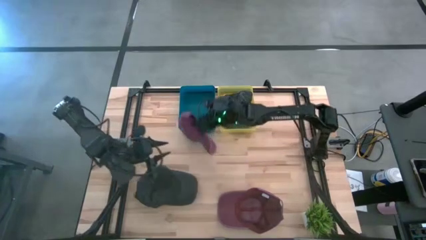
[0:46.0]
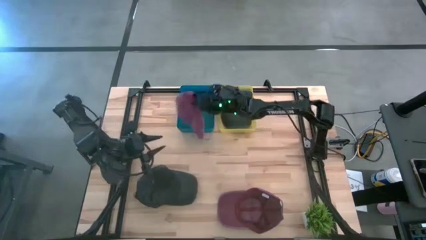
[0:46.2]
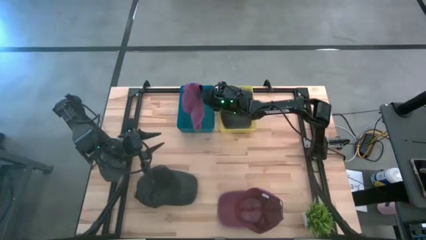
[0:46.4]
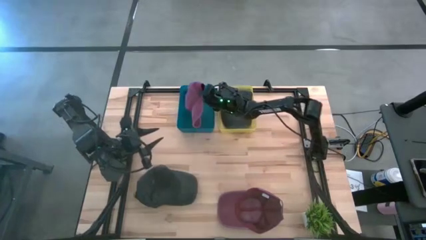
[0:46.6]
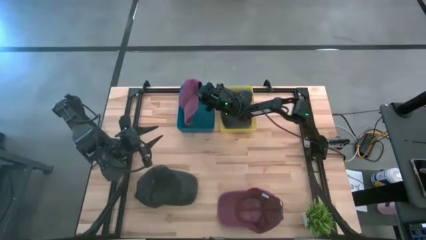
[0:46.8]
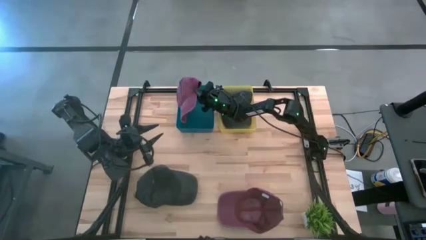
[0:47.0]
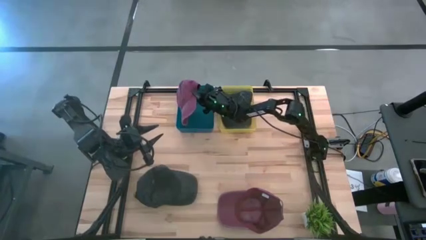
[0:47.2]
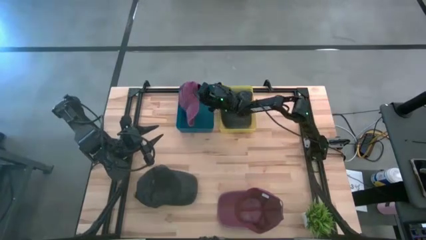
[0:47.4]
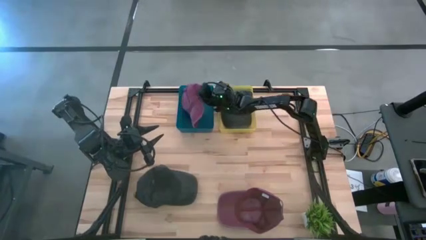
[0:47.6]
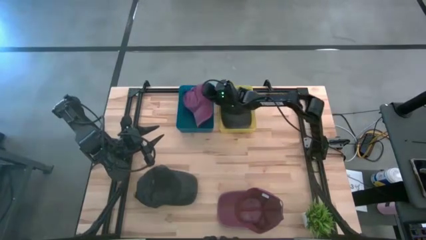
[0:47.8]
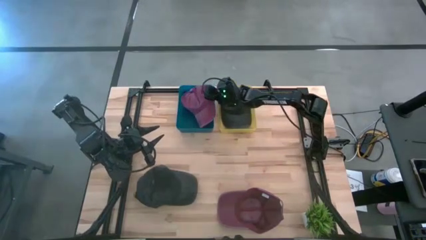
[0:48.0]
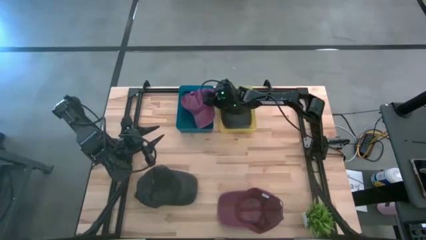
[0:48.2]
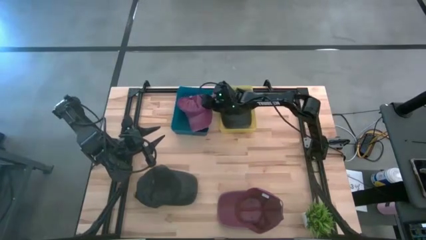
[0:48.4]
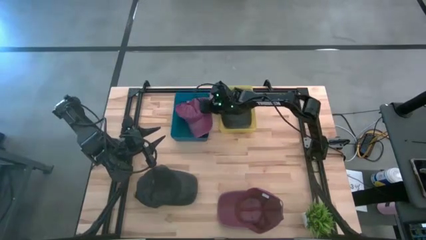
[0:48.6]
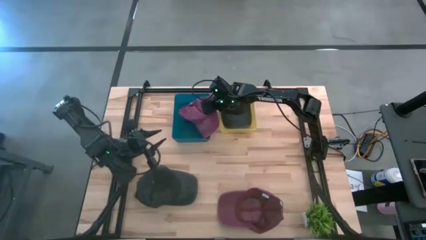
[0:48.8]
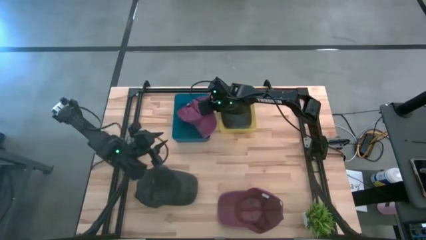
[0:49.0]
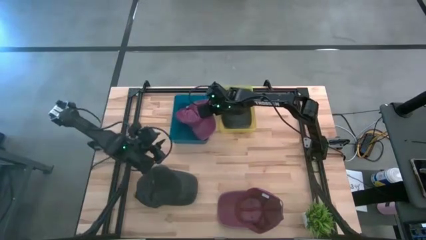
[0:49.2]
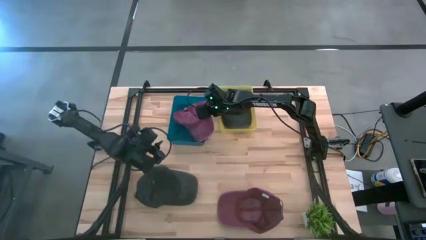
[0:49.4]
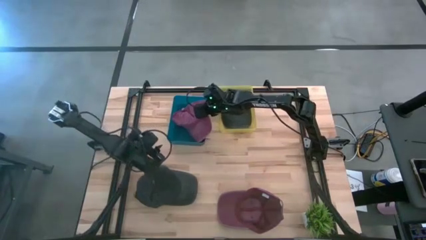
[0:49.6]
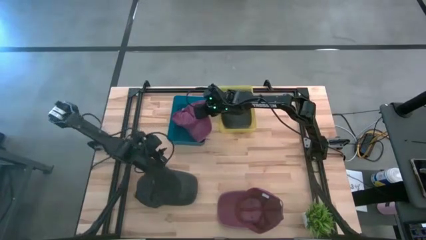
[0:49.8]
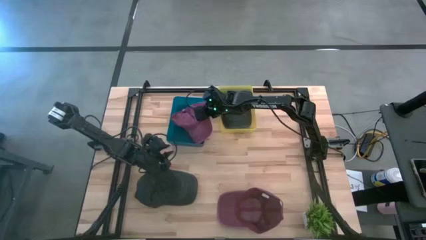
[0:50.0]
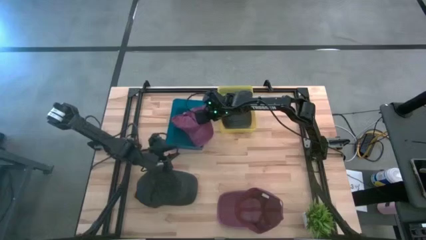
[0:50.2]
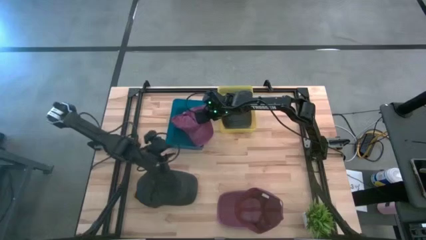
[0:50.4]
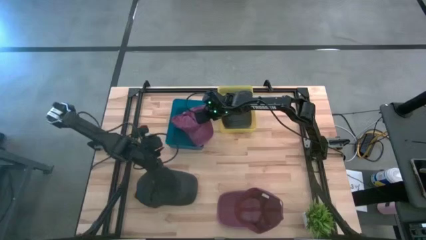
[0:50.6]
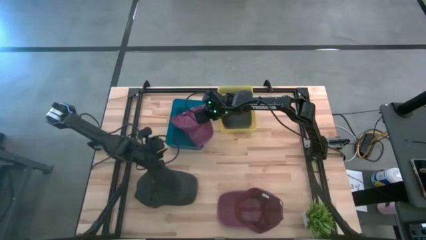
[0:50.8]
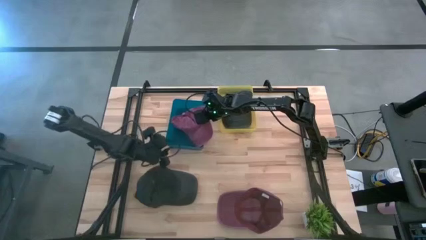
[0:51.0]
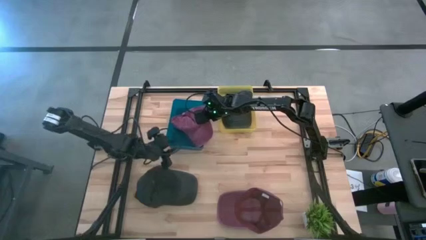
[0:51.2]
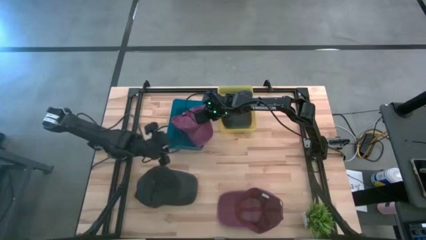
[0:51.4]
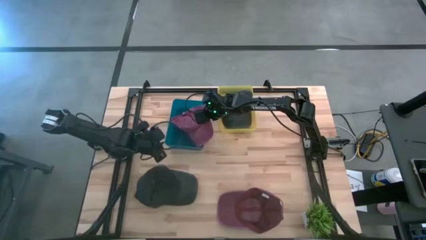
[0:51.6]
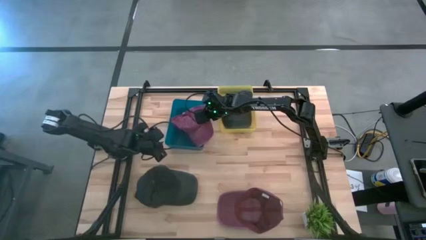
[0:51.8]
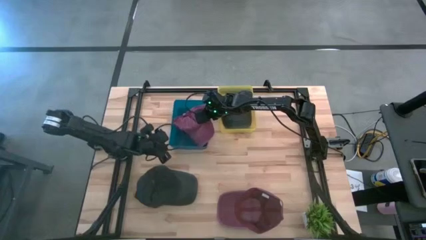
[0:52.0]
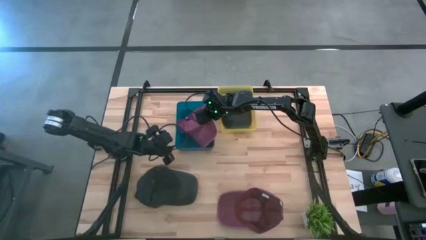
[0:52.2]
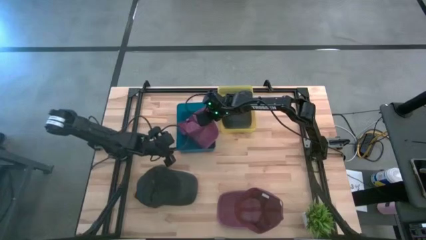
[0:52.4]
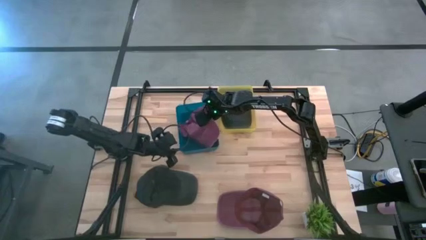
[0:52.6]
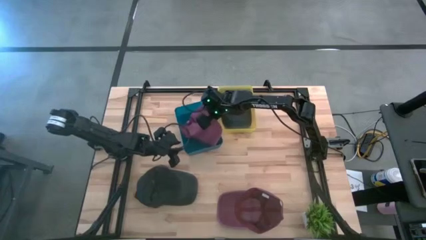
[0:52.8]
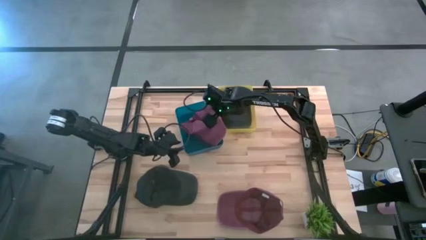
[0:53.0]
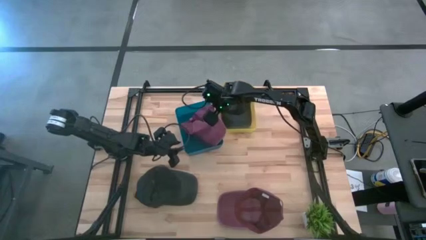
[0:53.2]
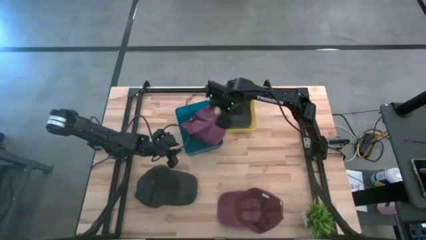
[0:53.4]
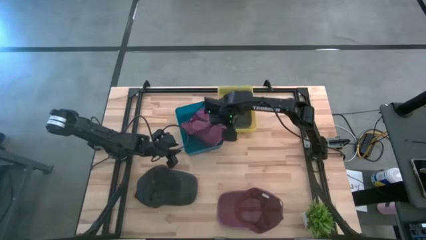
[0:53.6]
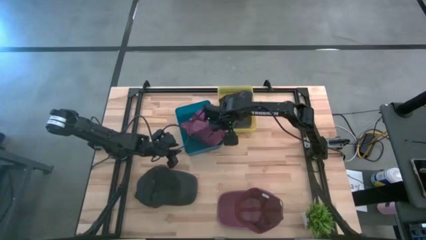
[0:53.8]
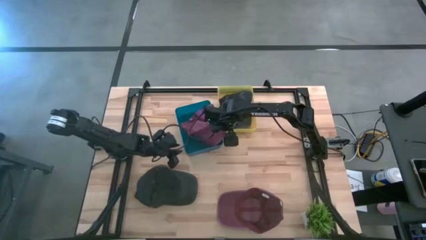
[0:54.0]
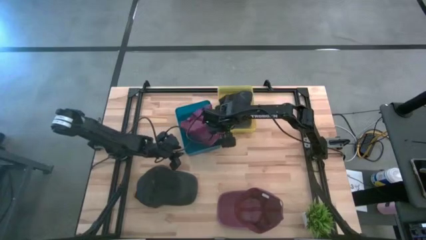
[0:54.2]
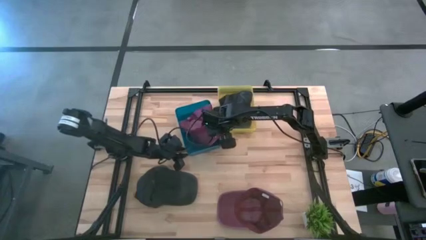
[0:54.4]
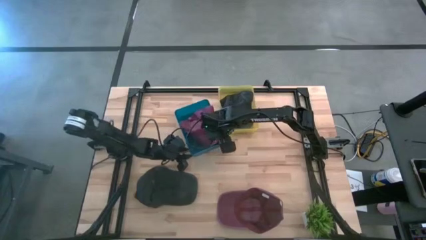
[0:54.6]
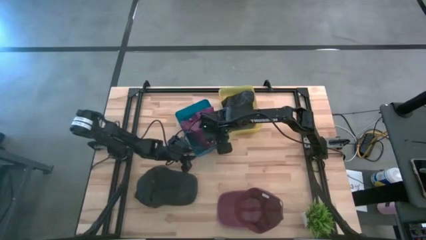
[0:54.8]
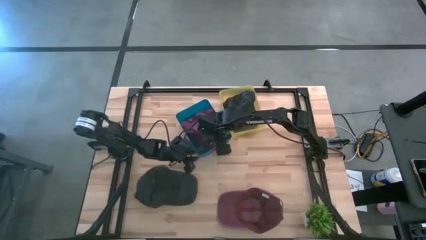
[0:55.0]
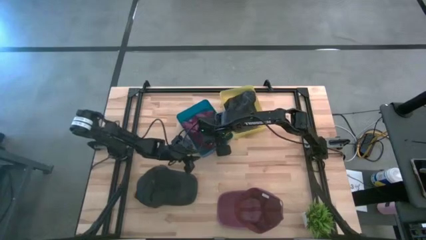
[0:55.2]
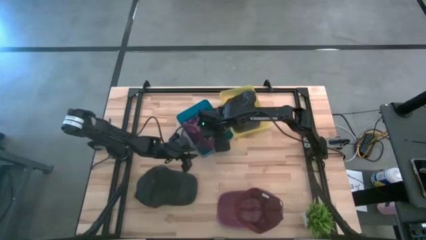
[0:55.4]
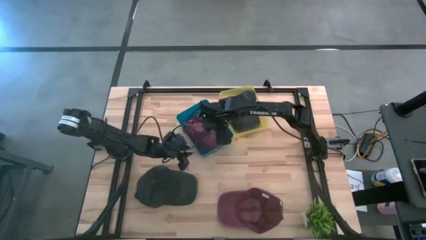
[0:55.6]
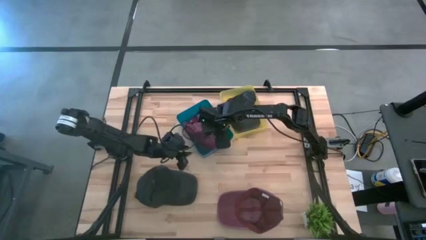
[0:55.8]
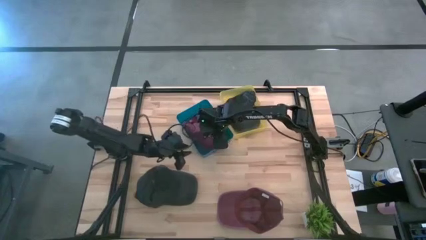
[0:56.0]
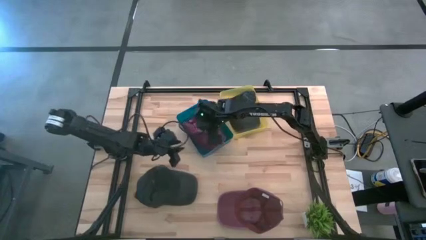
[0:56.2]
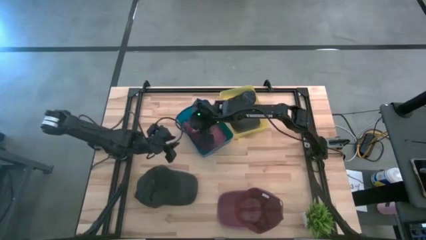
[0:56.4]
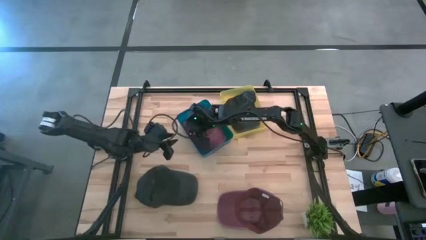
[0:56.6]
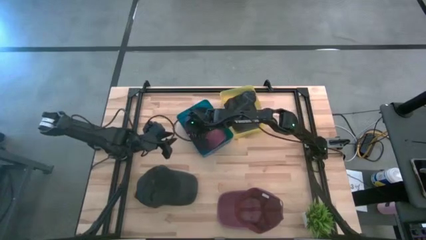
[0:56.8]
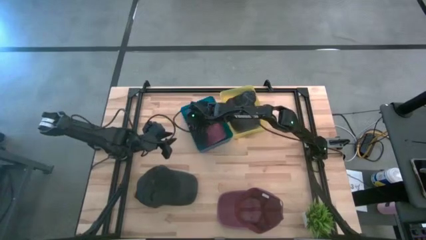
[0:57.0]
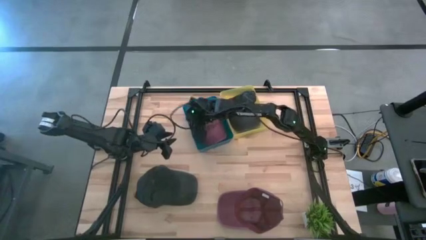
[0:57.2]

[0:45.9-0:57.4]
Task: Pick & Place hat
Put the red cap into the blue bin

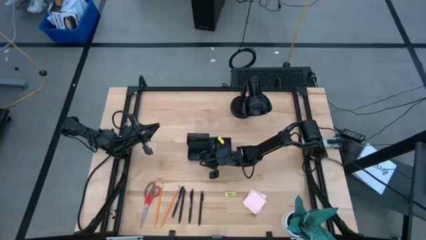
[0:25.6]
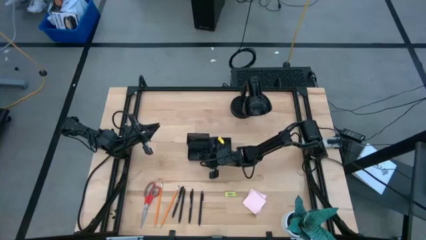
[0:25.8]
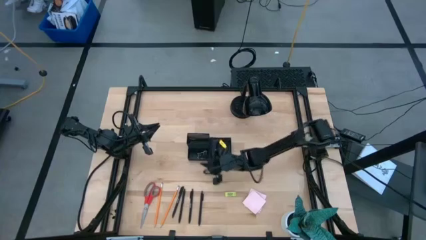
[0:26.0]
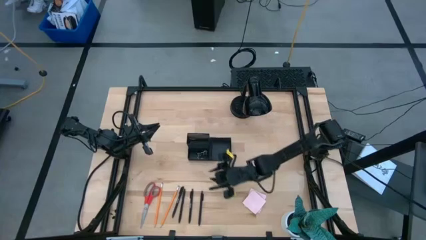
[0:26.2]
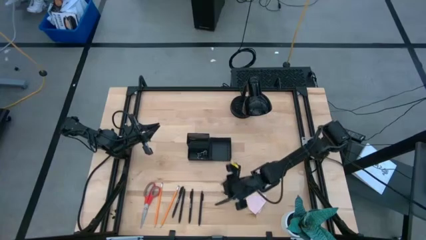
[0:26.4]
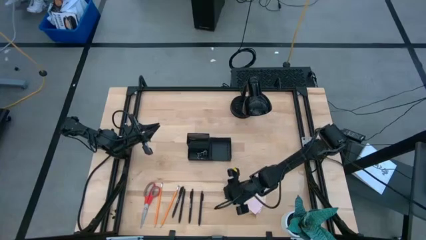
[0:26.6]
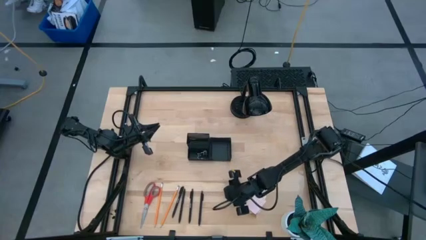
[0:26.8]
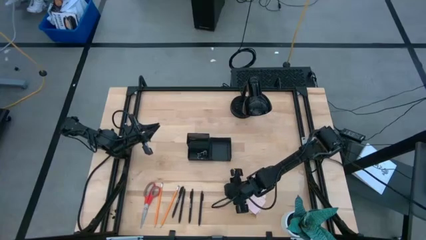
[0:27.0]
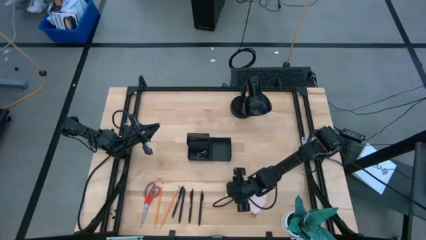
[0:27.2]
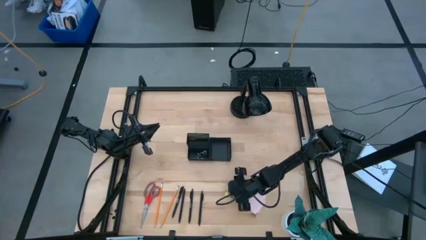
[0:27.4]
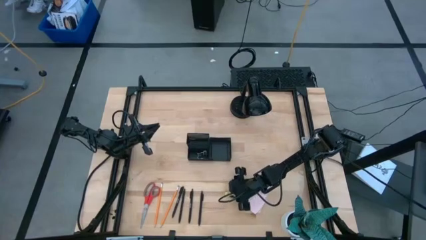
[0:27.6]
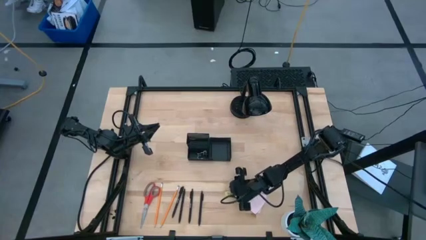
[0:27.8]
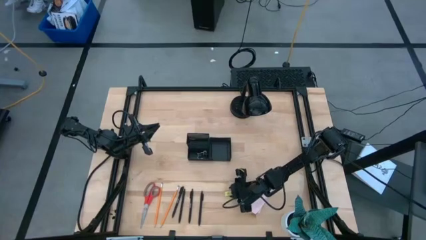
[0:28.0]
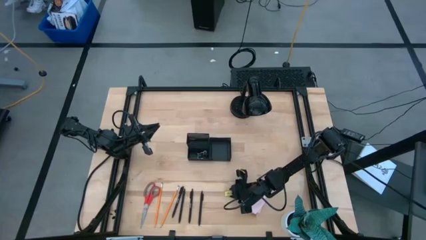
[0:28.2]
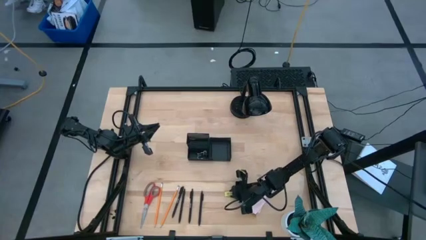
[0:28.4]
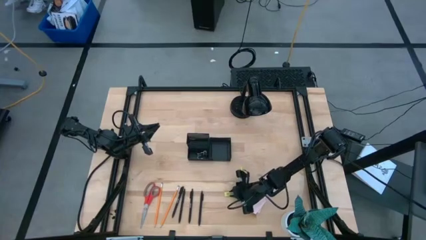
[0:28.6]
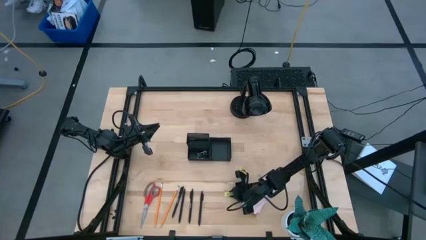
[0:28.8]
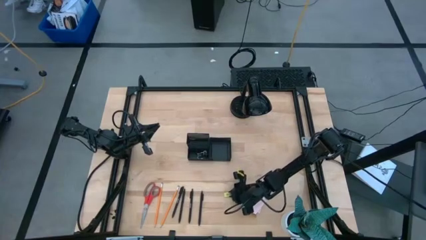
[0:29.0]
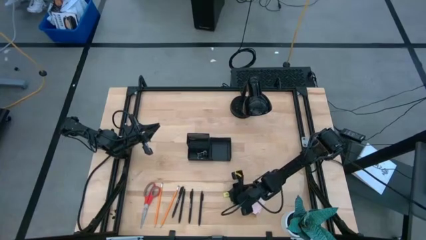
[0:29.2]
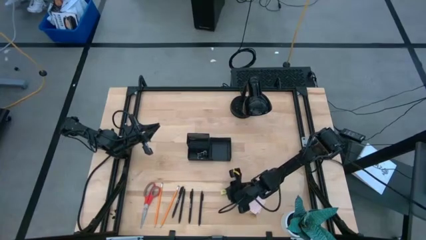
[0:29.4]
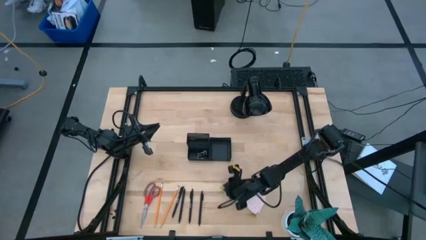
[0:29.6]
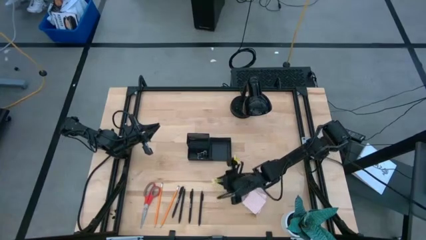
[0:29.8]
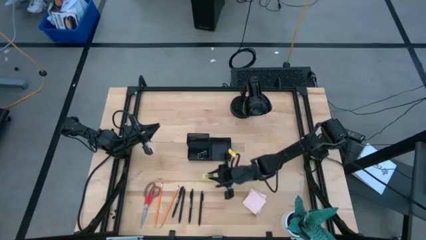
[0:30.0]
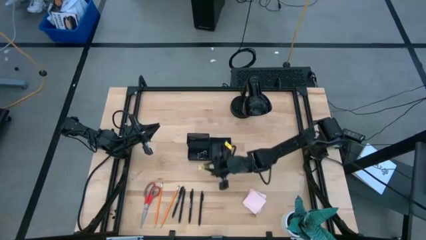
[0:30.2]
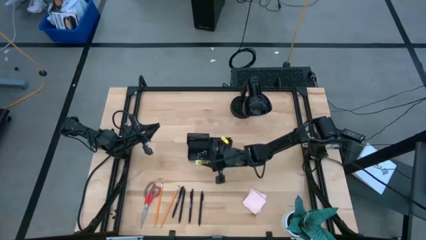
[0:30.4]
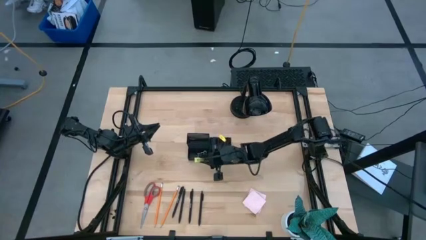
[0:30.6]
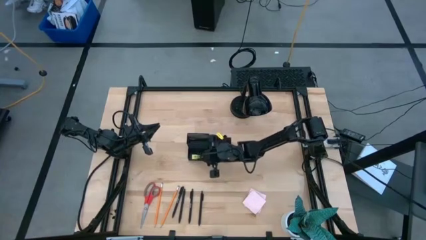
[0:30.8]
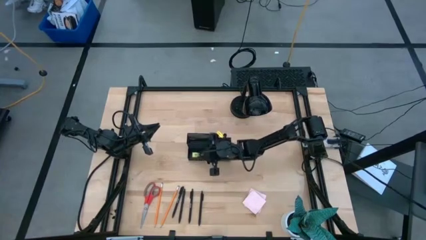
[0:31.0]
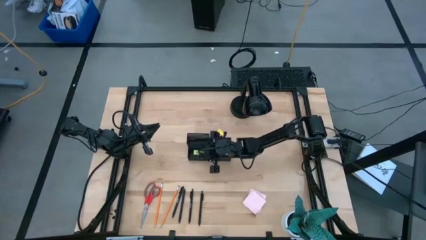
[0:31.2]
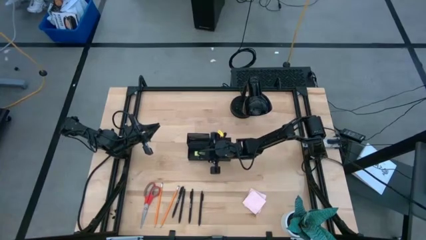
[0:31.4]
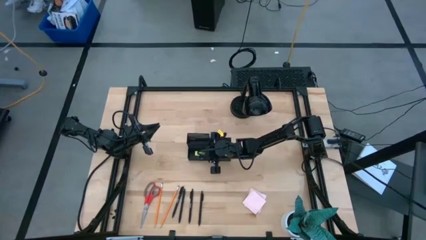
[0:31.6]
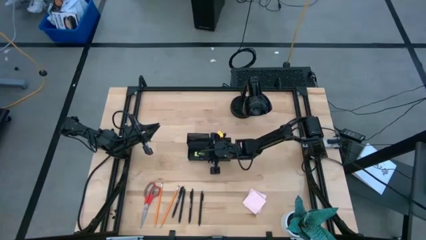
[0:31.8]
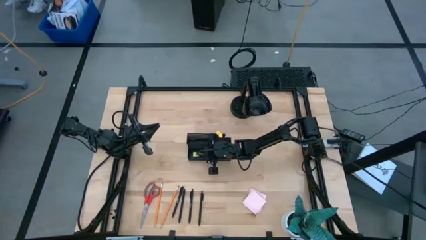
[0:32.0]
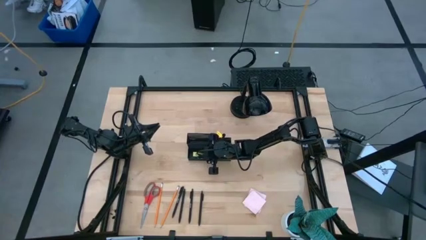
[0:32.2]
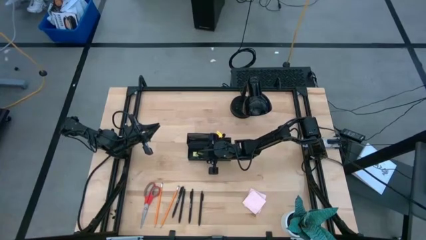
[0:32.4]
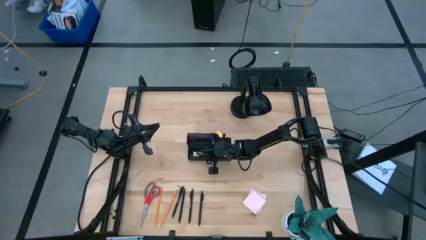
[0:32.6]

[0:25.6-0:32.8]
Task: Pick and place office supplies into organizer
Put the yellow eraser into the black desk organizer
